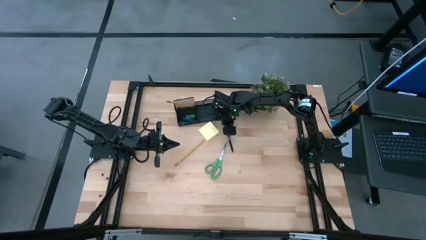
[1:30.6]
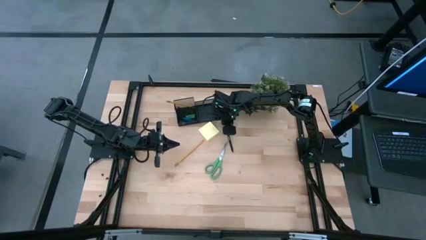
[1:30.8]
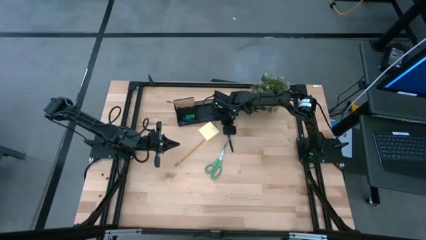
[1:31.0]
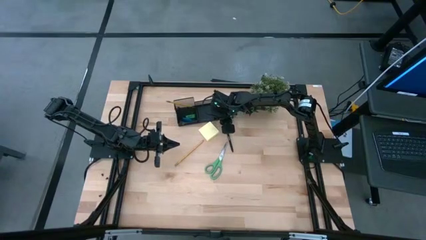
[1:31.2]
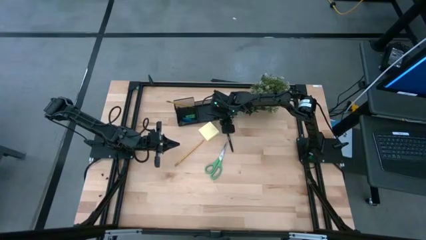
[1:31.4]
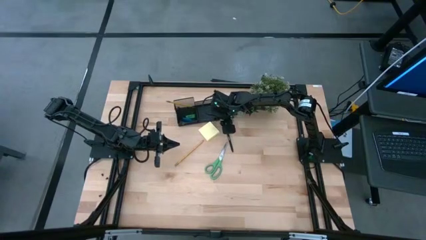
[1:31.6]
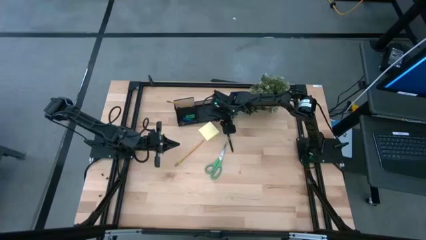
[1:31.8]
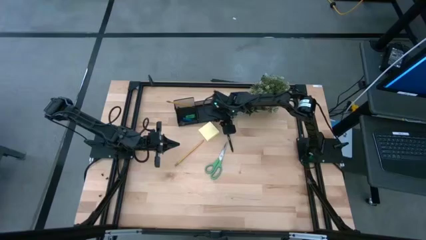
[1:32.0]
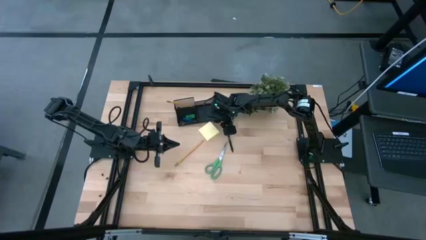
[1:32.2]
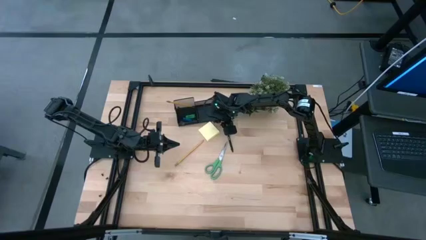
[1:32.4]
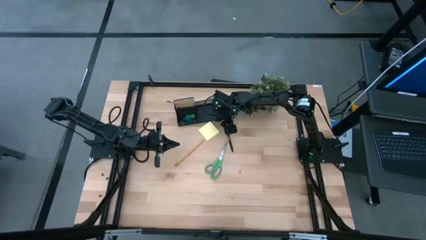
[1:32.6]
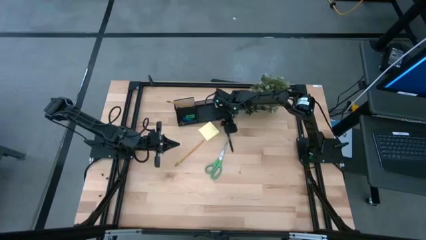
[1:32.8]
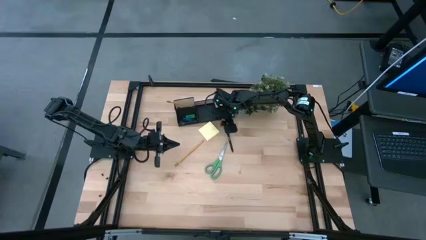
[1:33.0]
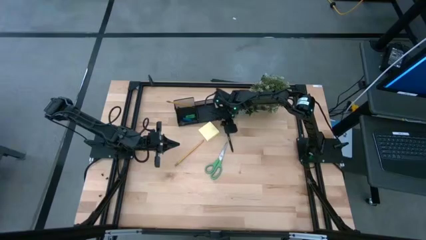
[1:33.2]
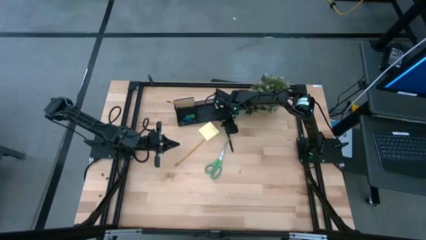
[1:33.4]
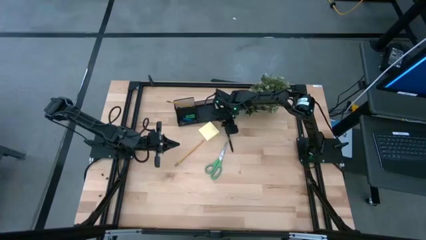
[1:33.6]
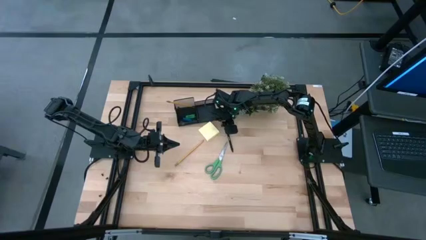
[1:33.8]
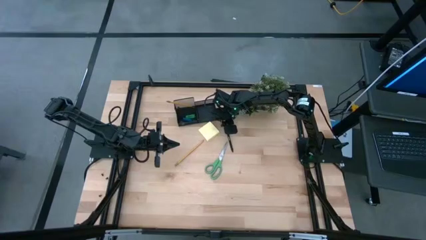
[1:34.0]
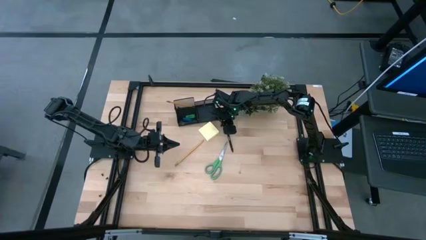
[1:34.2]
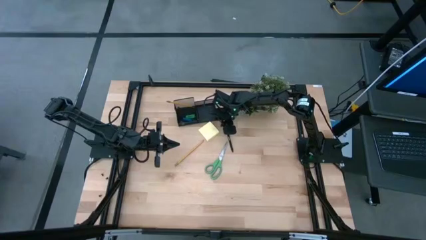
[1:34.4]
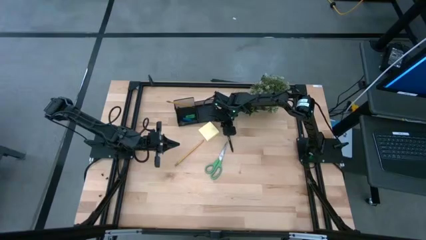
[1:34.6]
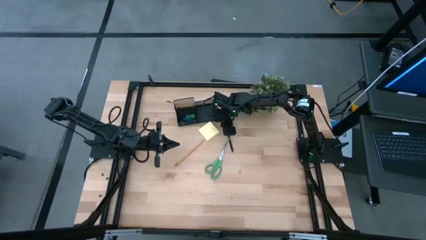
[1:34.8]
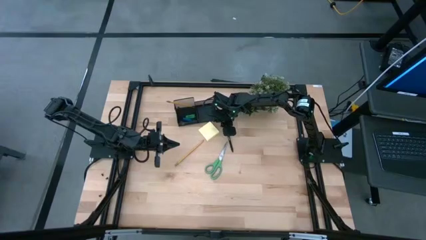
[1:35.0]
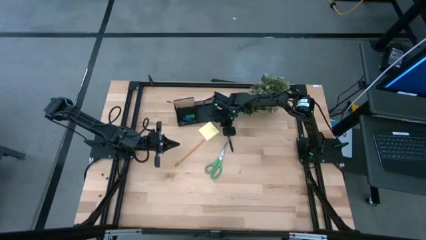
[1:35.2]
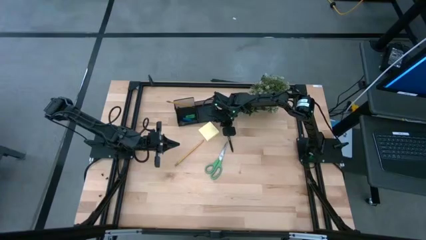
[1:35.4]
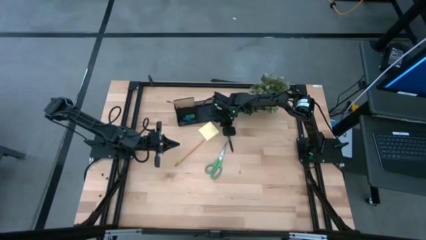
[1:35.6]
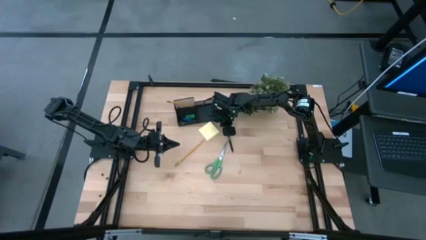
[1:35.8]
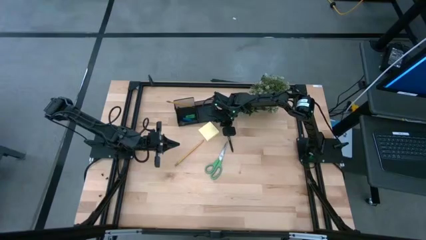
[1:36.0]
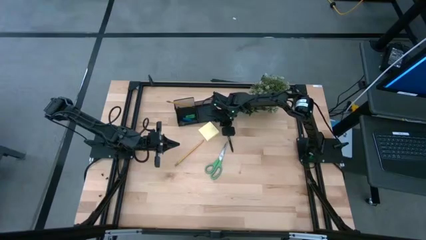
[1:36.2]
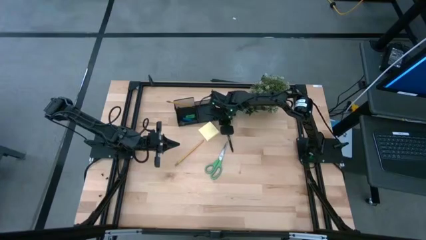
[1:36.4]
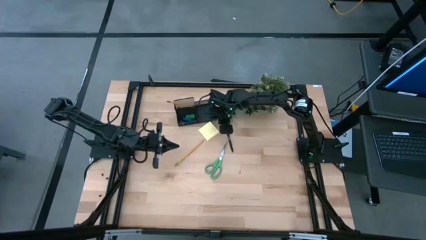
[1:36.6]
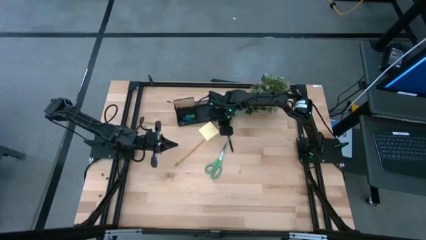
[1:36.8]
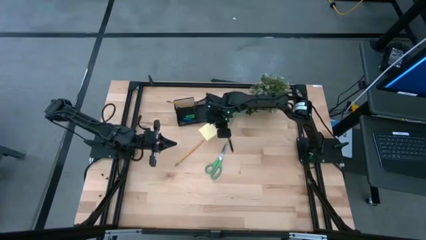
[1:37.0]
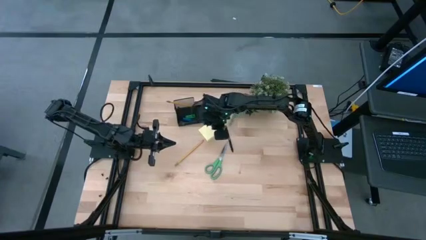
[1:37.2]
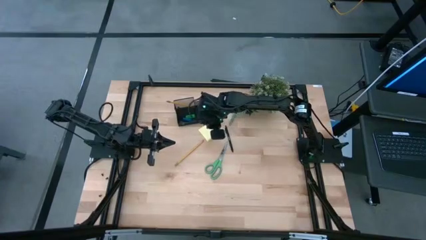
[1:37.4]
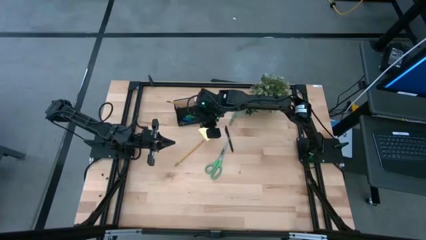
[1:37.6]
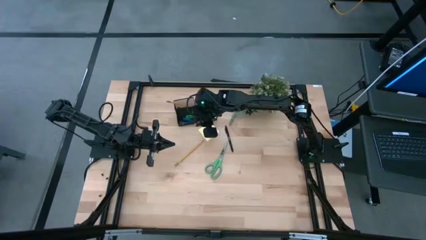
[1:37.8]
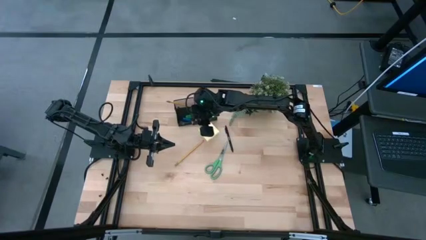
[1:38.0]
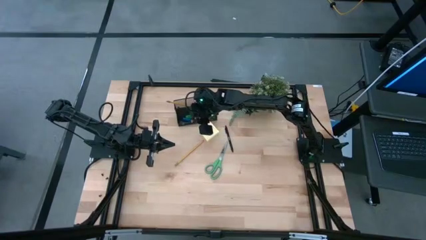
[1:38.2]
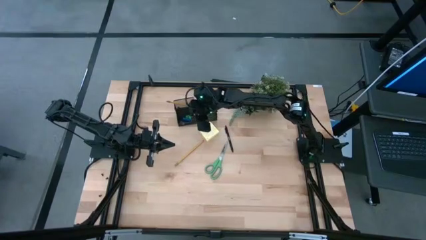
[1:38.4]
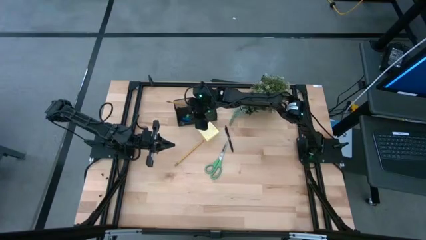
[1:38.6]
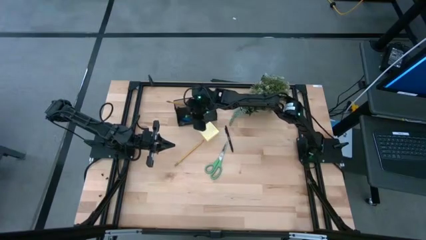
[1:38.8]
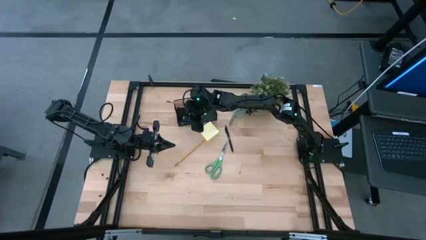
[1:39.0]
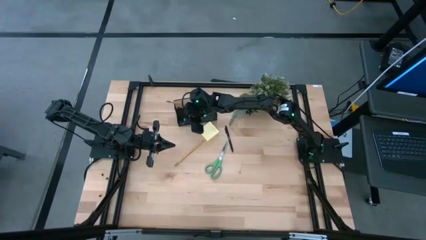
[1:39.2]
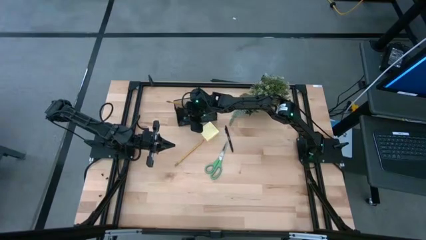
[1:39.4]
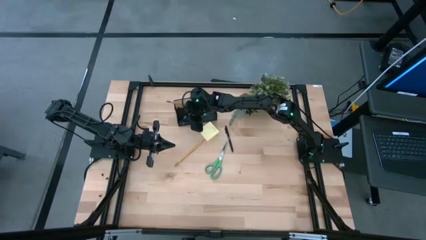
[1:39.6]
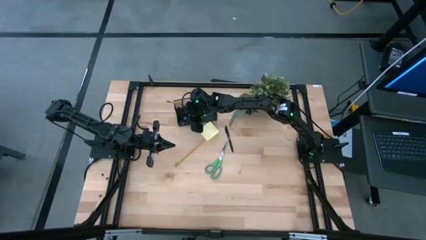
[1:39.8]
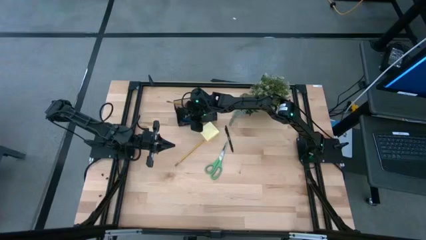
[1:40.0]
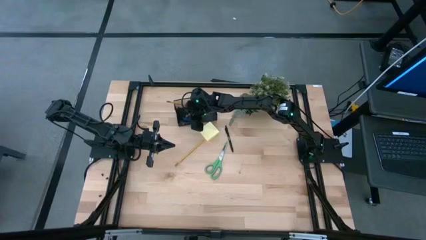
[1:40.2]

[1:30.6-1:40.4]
Task: Pick and place office supplies into organizer
Put the yellow paper clip into the black desk organizer

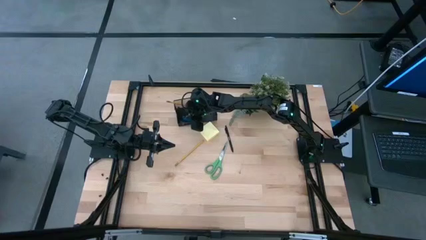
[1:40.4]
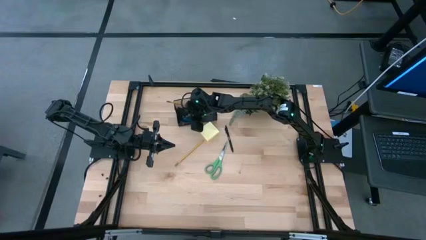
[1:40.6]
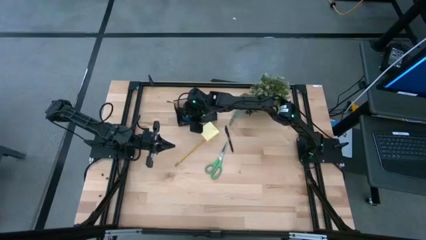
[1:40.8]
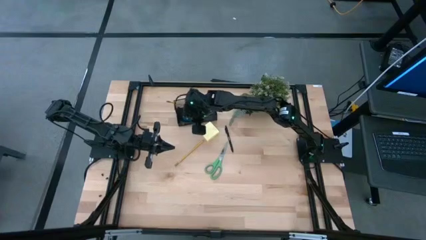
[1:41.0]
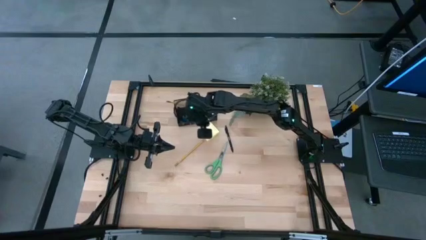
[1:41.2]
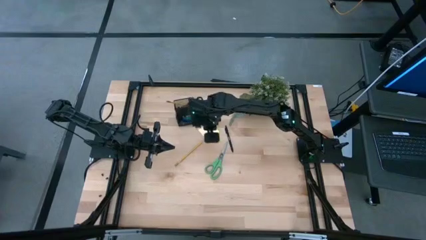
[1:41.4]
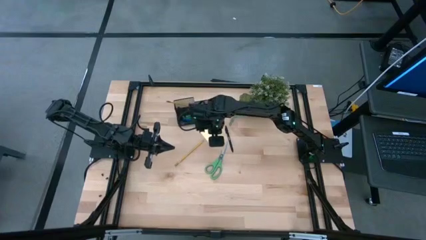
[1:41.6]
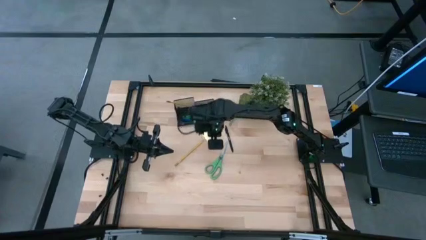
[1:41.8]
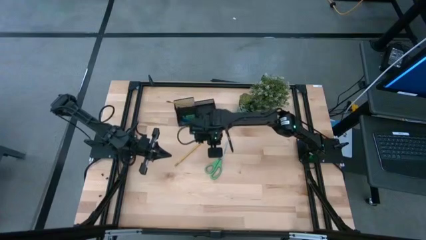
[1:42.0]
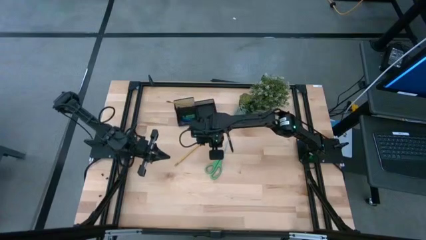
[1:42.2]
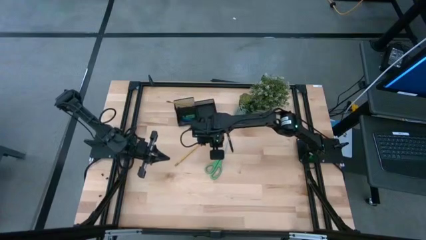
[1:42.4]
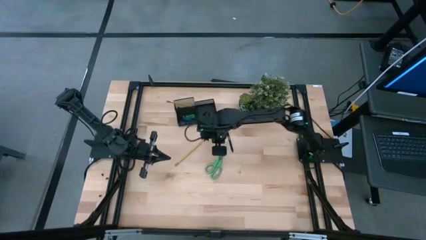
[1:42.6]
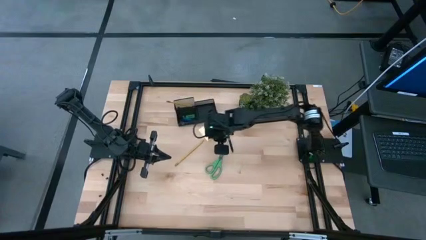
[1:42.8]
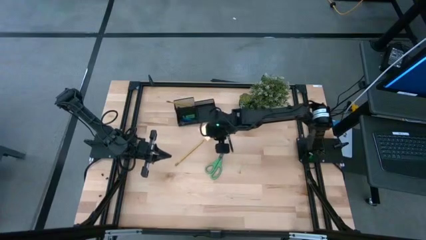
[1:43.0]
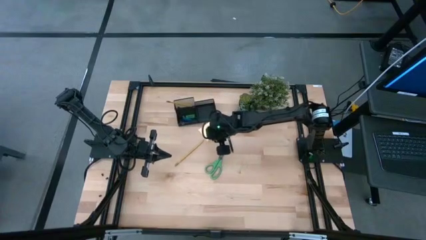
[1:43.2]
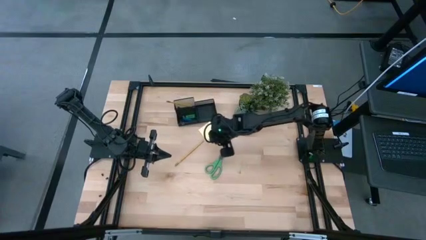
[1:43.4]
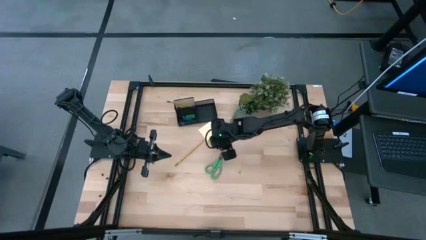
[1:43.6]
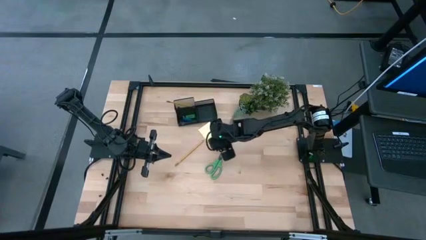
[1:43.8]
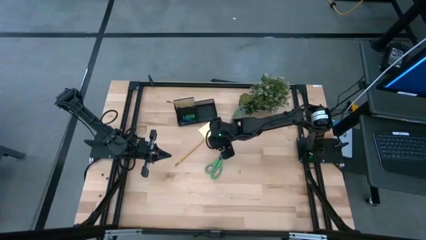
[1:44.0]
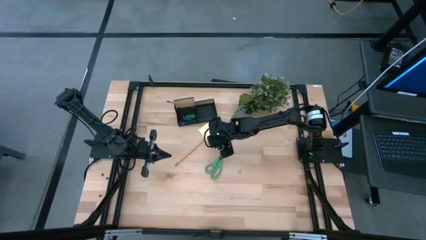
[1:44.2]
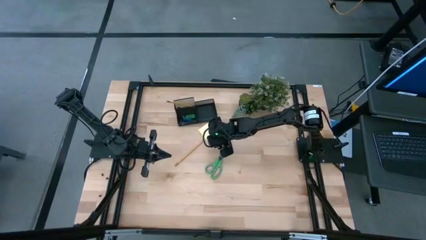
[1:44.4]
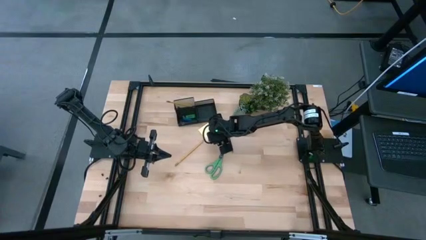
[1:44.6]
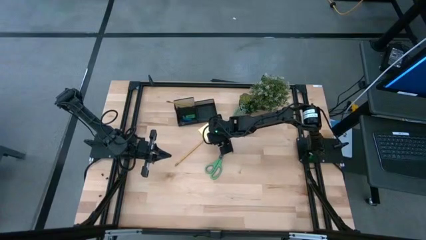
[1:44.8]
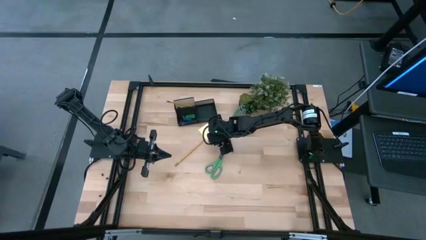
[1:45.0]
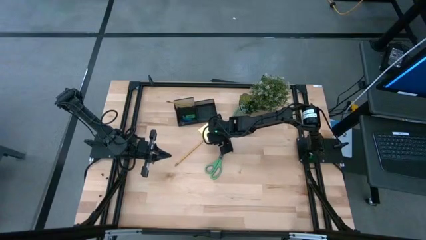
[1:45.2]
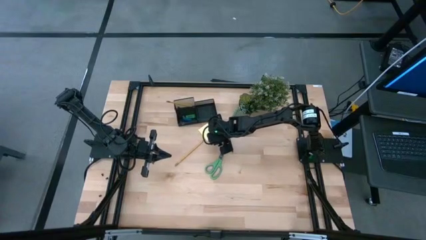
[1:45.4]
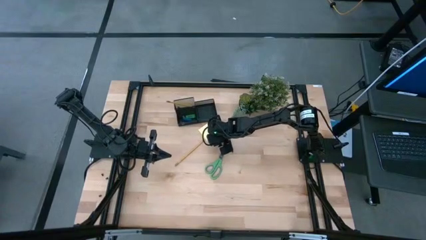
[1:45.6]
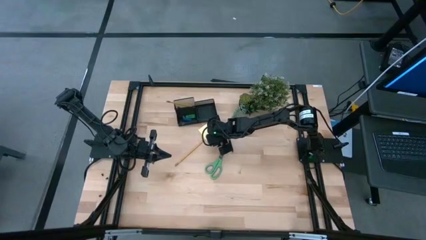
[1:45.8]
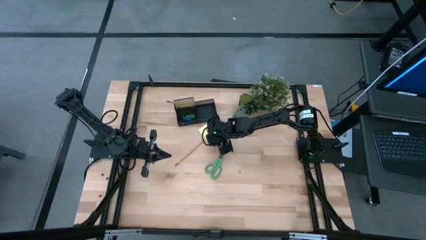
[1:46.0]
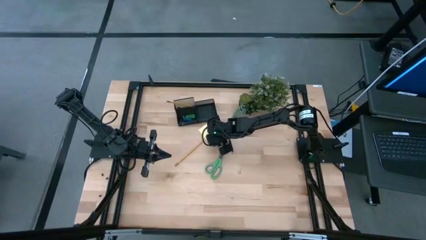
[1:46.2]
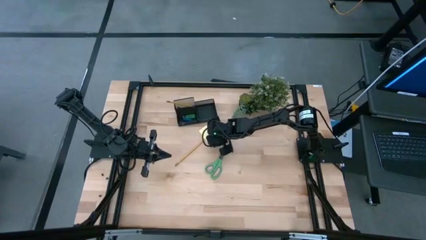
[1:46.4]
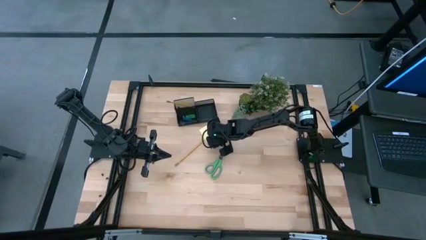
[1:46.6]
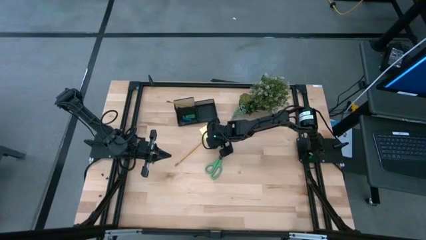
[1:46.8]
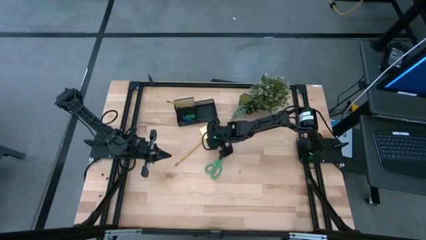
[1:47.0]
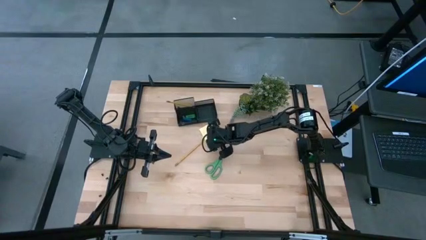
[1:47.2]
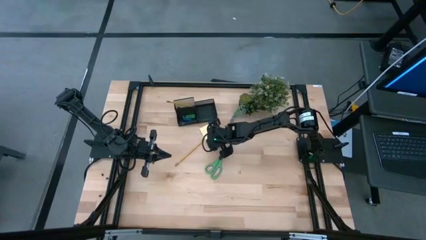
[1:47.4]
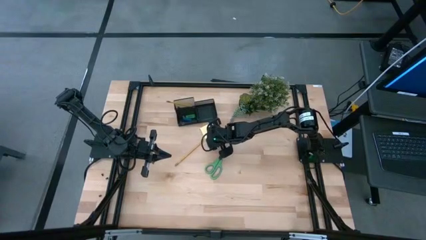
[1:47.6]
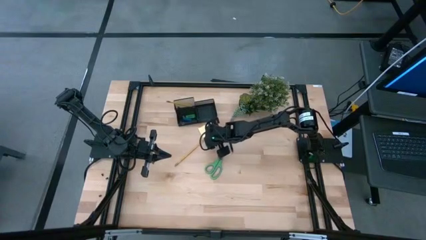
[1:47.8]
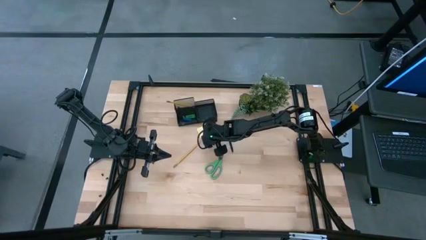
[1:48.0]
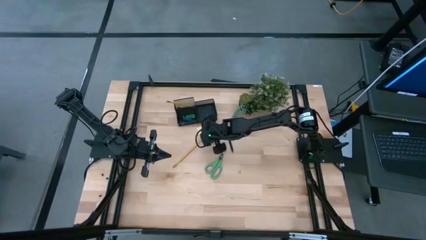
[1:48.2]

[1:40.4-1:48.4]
Put the yellow sticky notes into the black desk organizer
